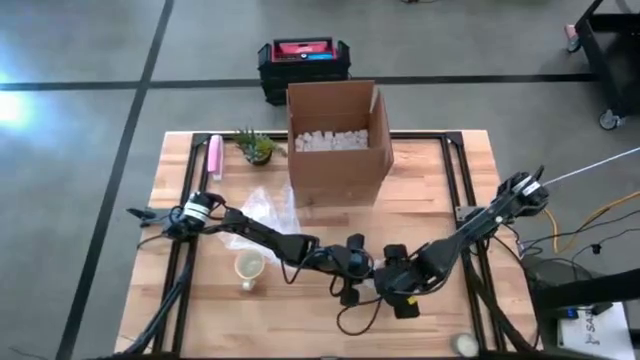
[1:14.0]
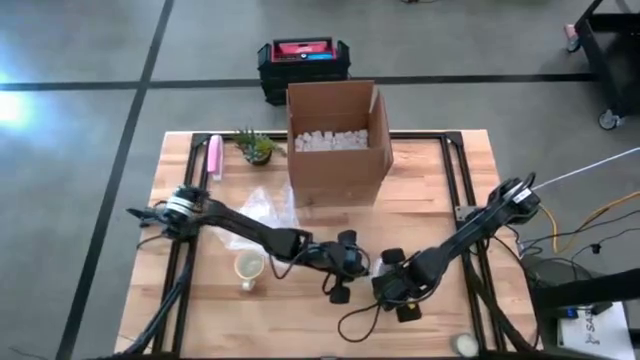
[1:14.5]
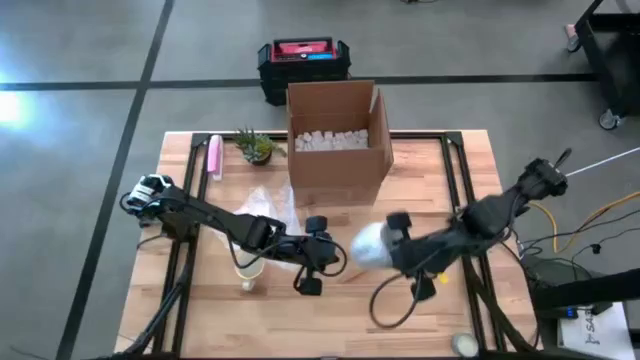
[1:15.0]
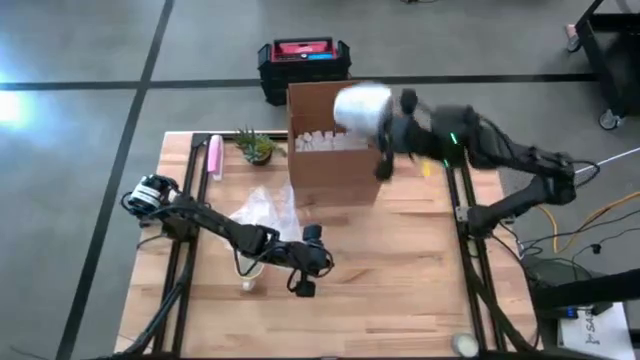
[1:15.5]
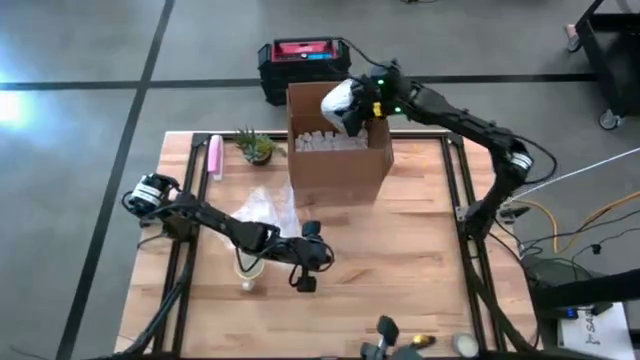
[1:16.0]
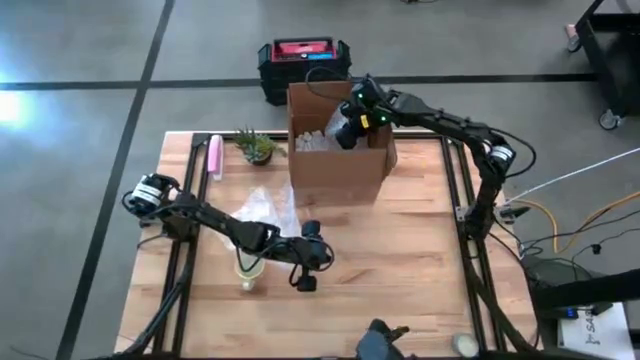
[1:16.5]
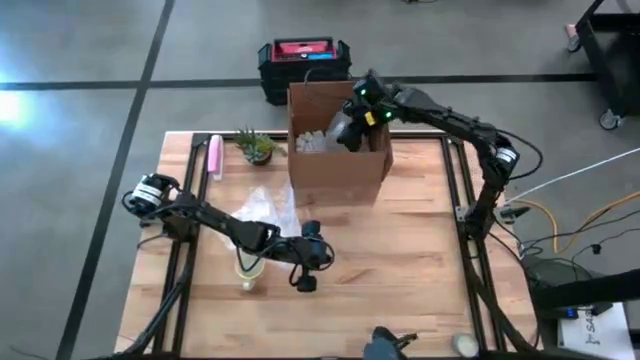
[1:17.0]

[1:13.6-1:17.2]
Task: wrap mug
Put the wrapped gray patterned mug into the cardboard box

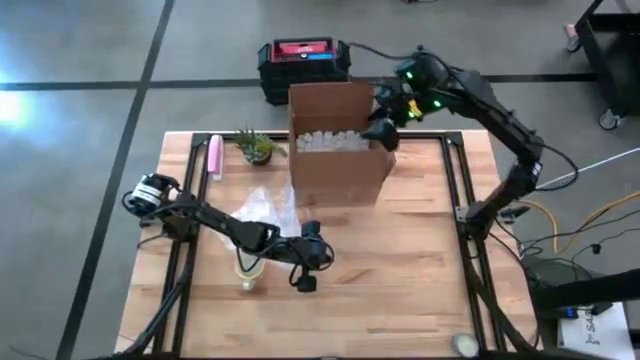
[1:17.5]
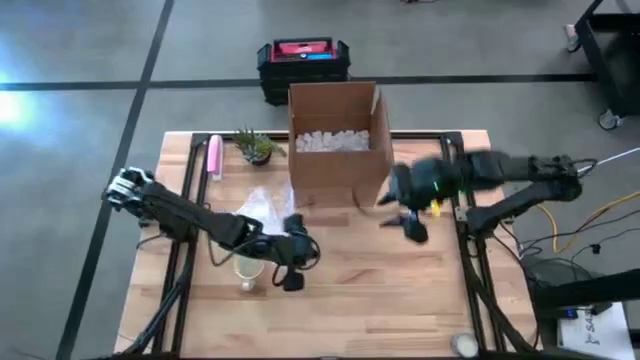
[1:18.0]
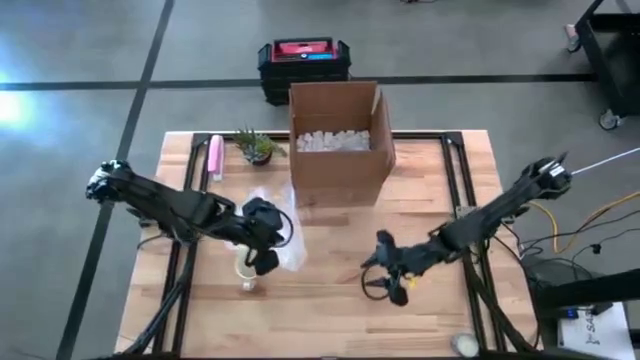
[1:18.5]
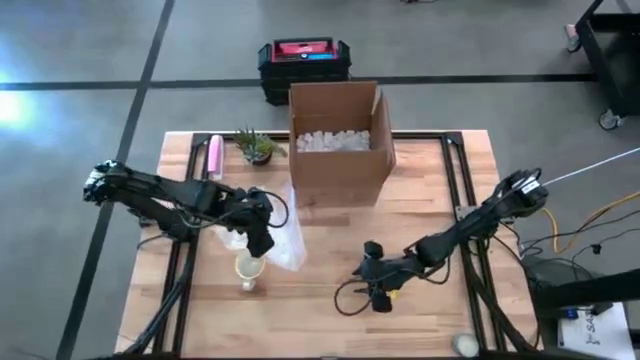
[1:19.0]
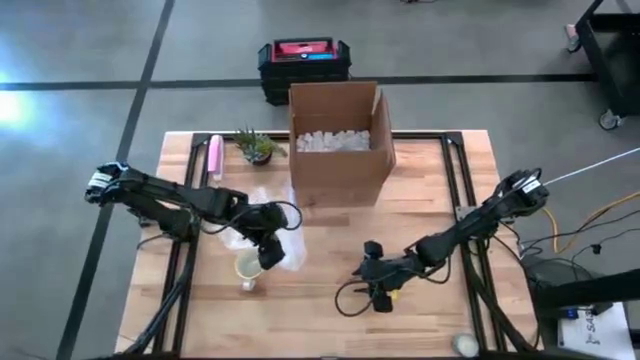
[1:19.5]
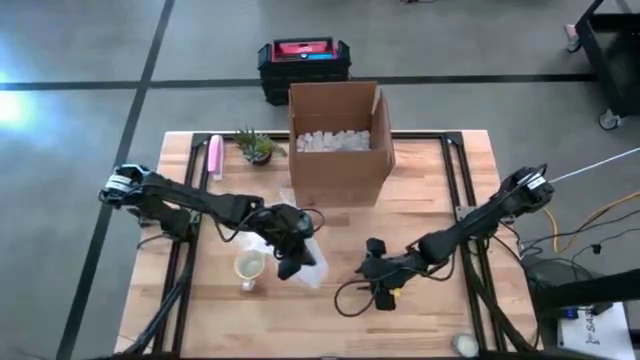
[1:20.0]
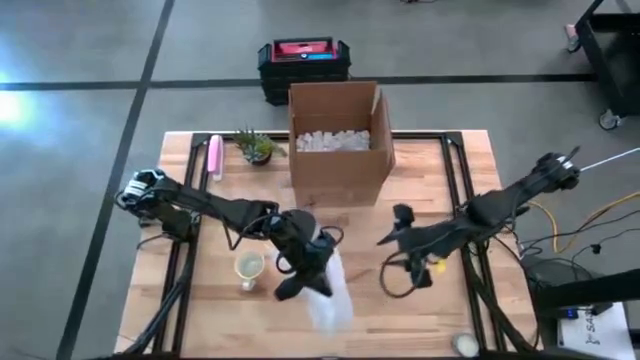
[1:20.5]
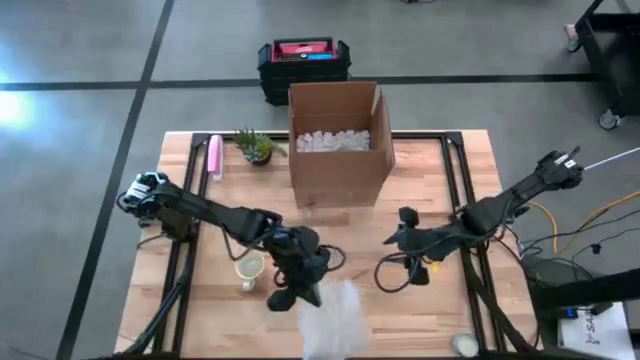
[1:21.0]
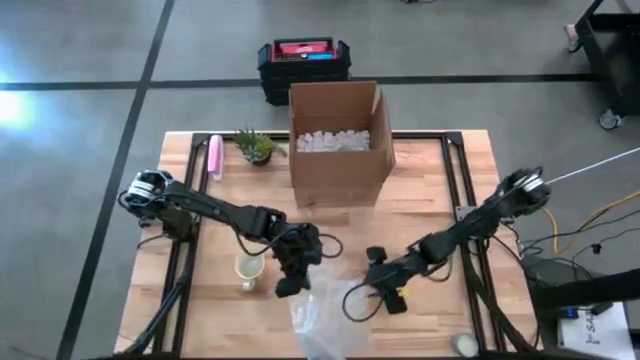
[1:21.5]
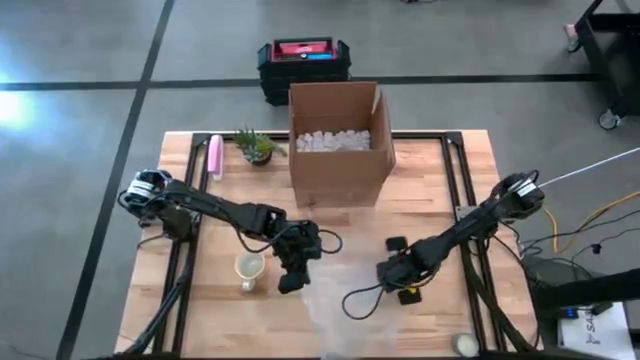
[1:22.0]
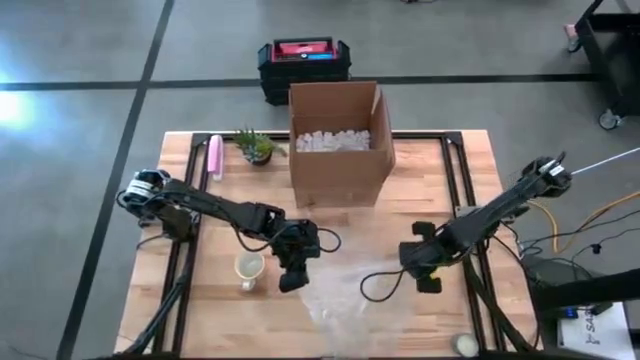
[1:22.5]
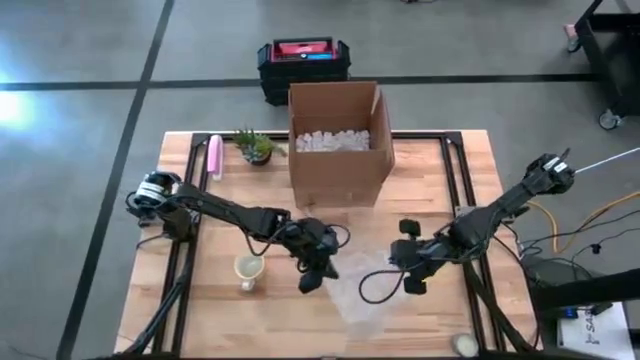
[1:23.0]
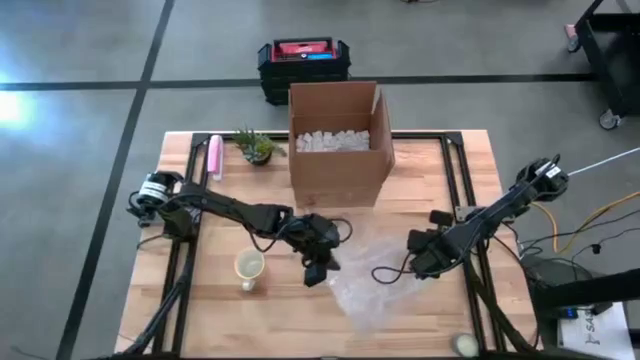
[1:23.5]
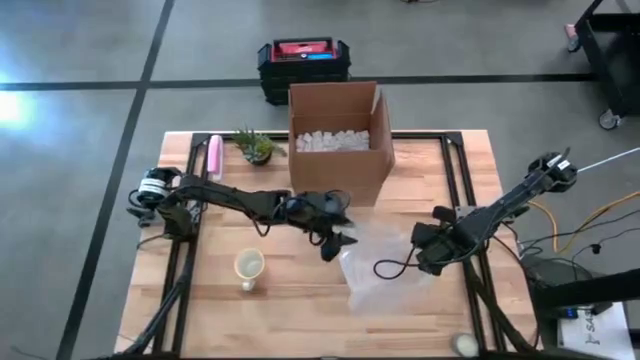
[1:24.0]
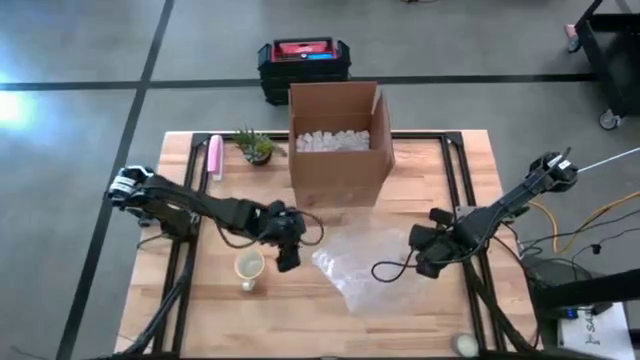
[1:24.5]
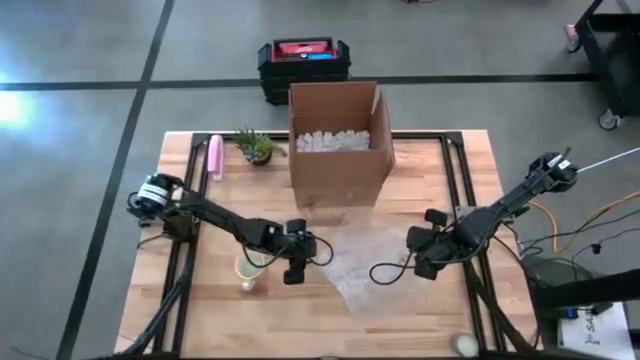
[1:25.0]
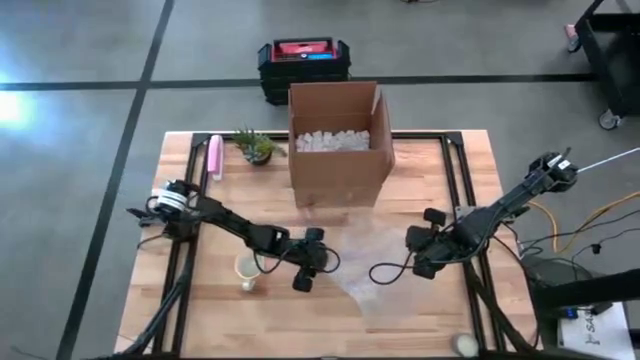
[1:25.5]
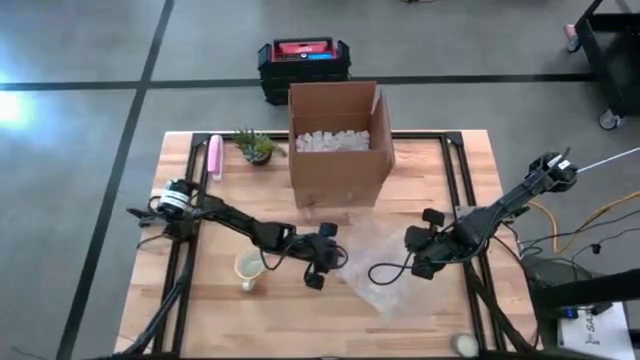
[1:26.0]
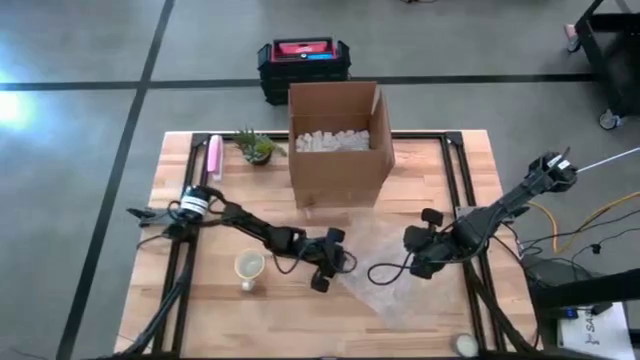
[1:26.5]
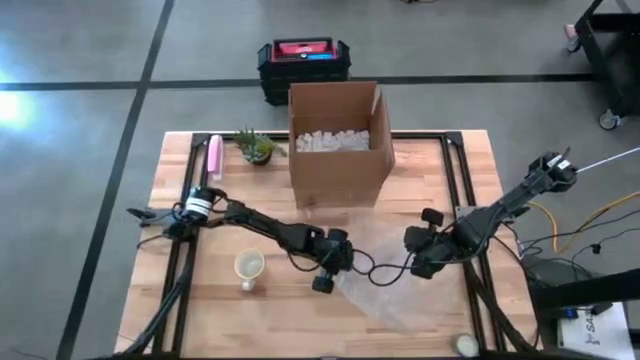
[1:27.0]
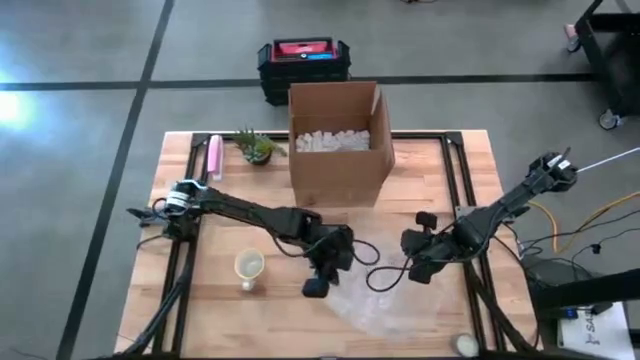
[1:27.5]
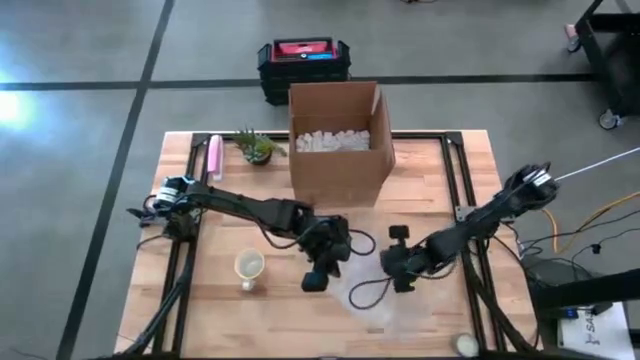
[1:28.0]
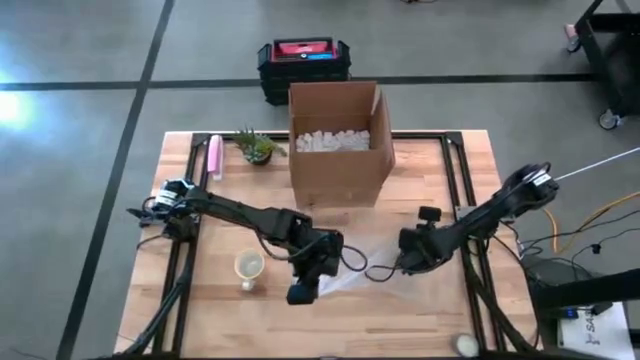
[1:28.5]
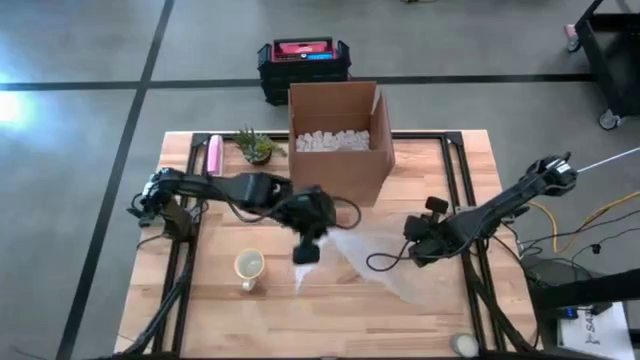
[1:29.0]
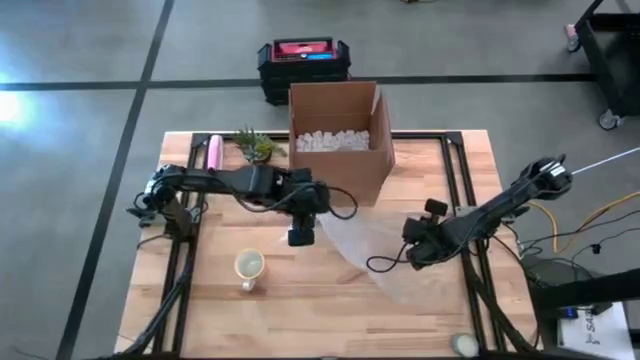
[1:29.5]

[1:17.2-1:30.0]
Wrap the orange patterned mug using the bubble wrap

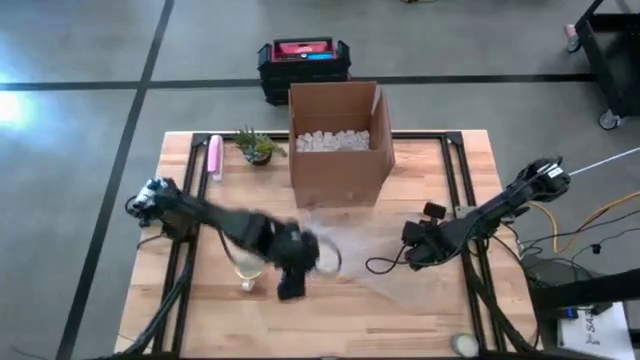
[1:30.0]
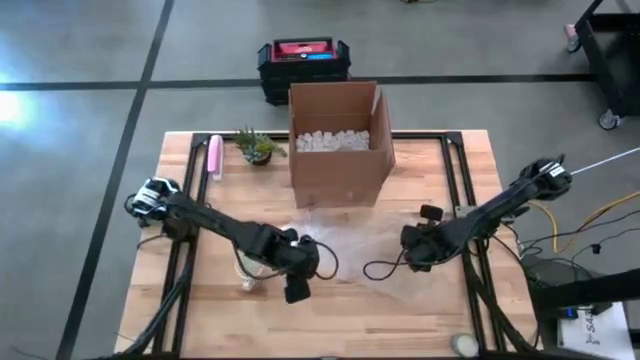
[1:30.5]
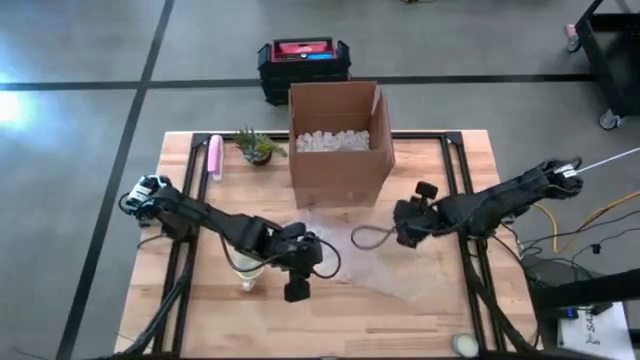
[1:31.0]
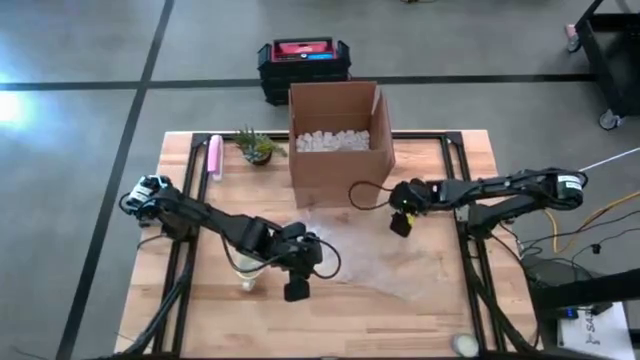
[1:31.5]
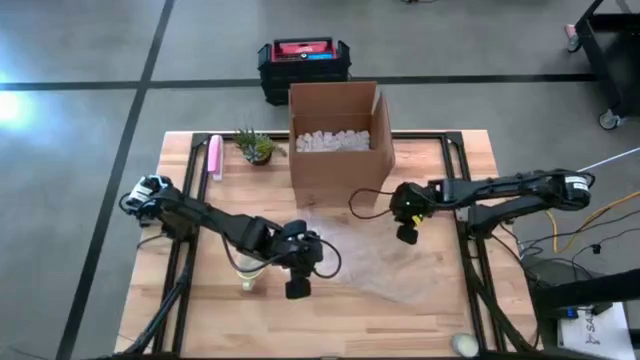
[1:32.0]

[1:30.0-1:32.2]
Wrap the orange patterned mug using the bubble wrap

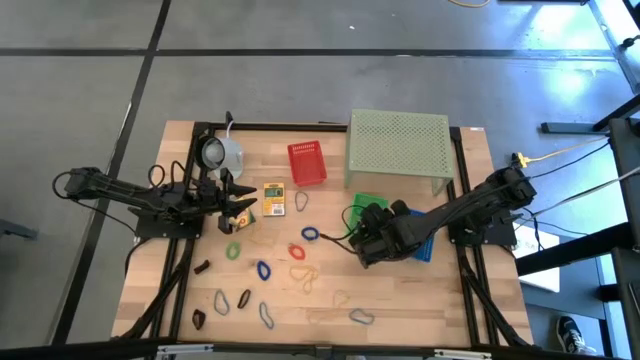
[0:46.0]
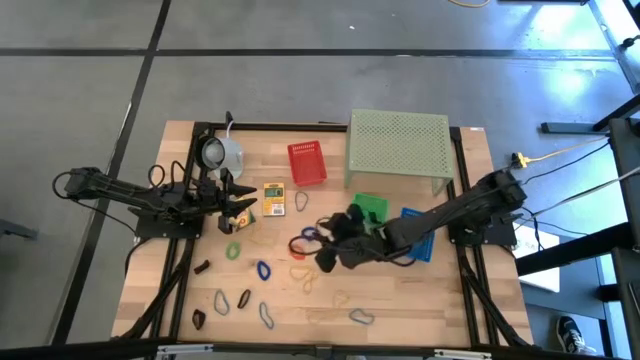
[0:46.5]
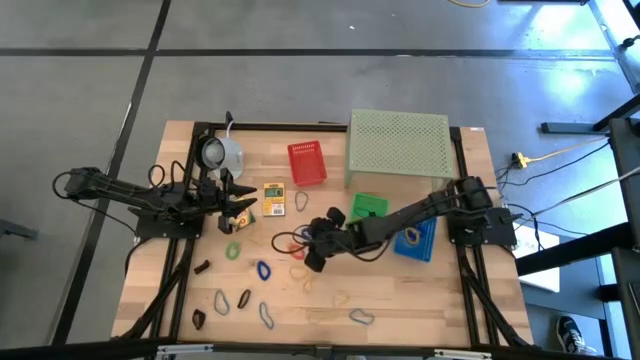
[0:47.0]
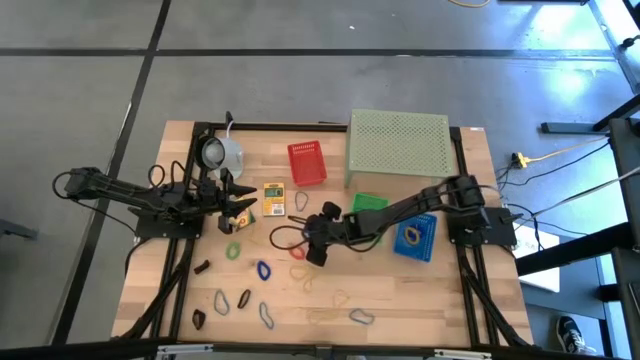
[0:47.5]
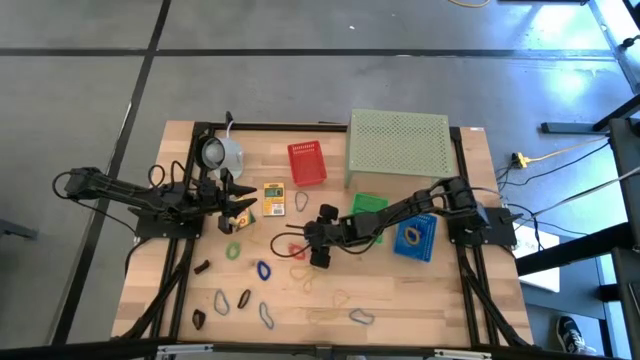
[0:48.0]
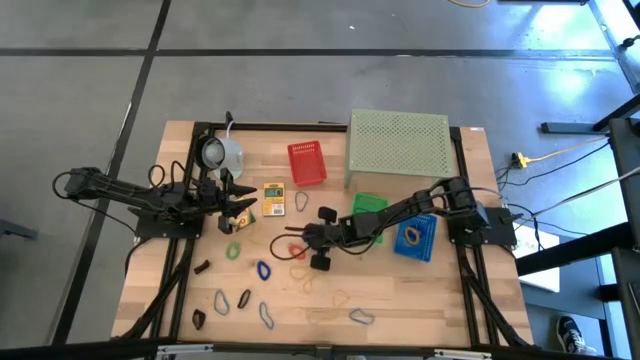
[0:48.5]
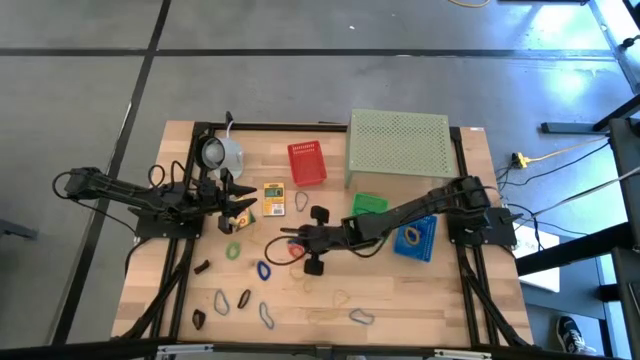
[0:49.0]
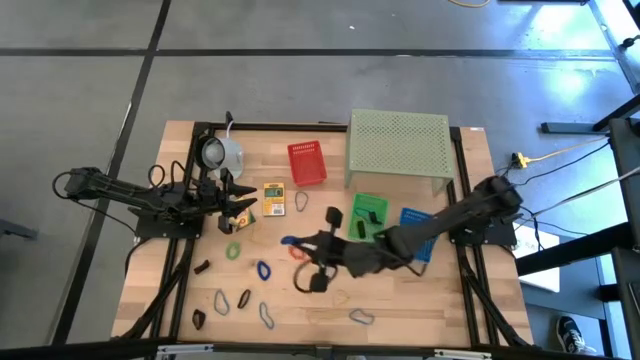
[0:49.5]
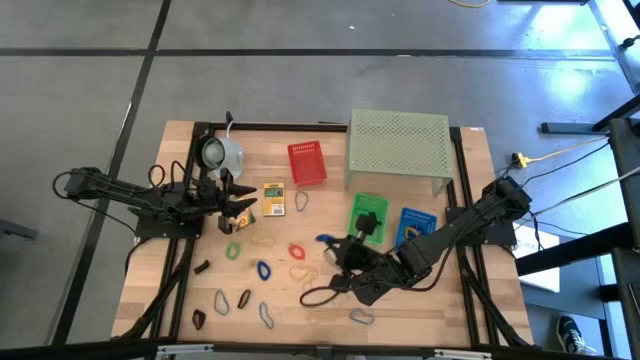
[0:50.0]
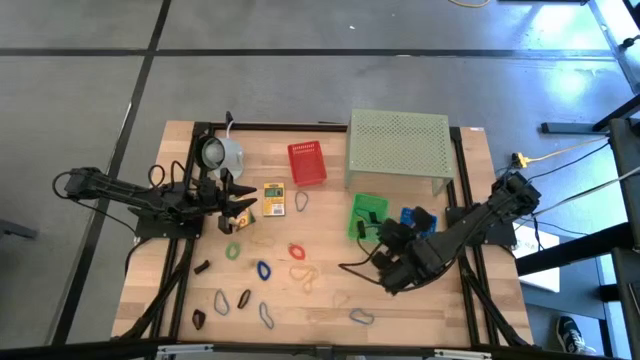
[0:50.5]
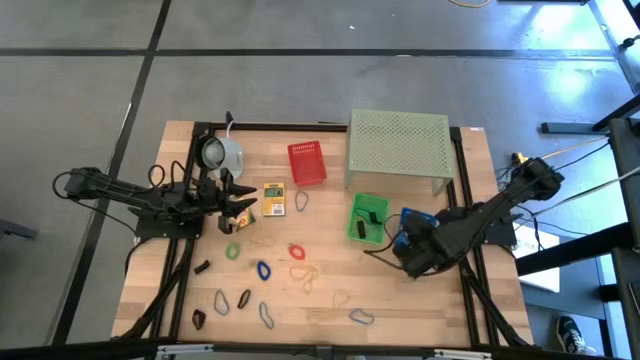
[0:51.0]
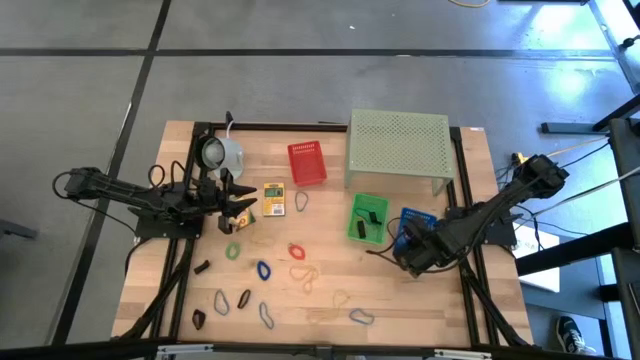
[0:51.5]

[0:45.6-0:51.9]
Task: Pick & Place Office Desk Supplies
Put the blue spring keychain into the blue bin
